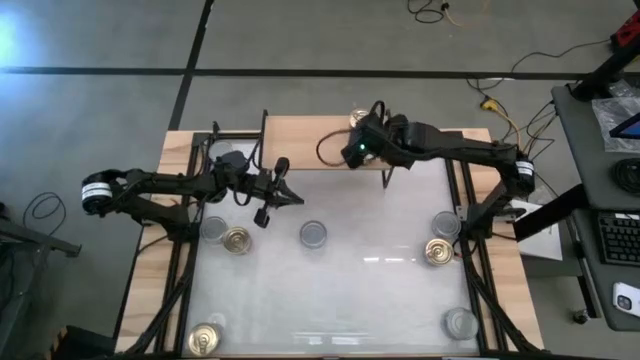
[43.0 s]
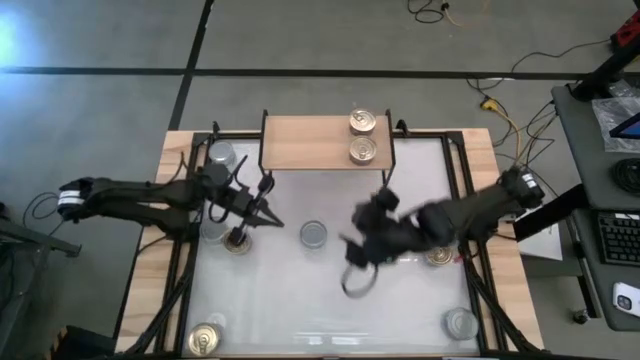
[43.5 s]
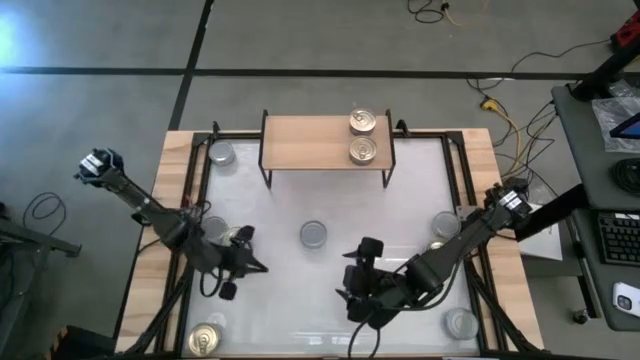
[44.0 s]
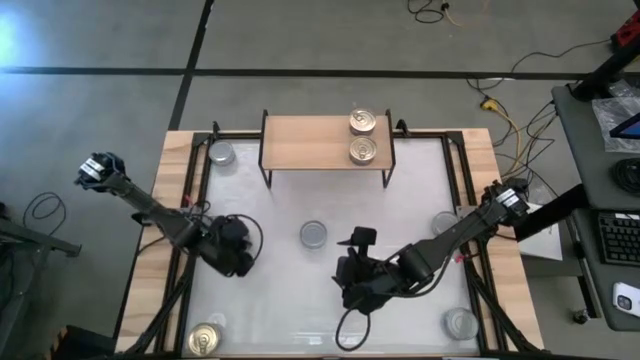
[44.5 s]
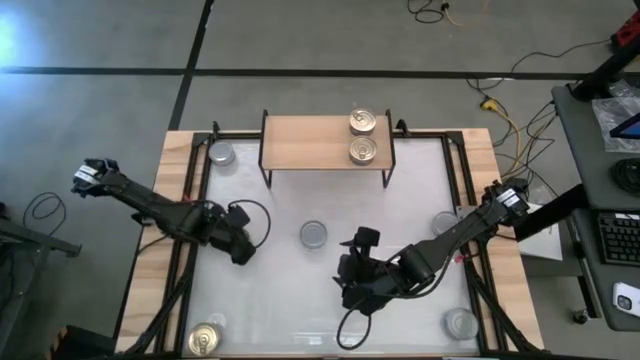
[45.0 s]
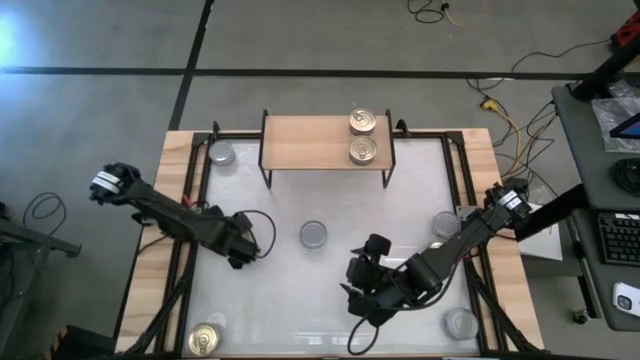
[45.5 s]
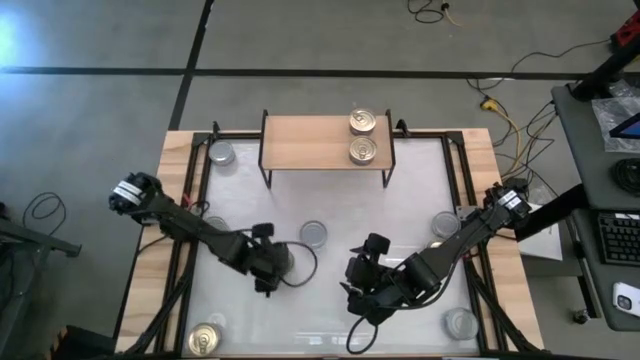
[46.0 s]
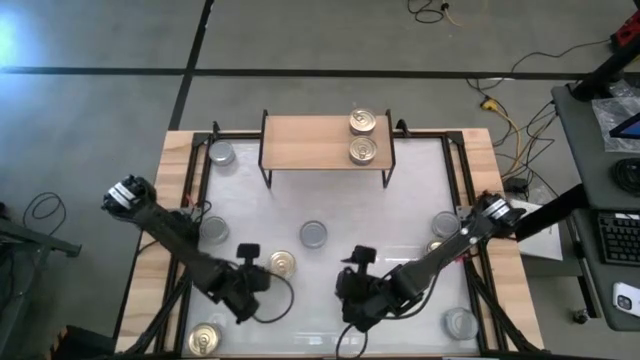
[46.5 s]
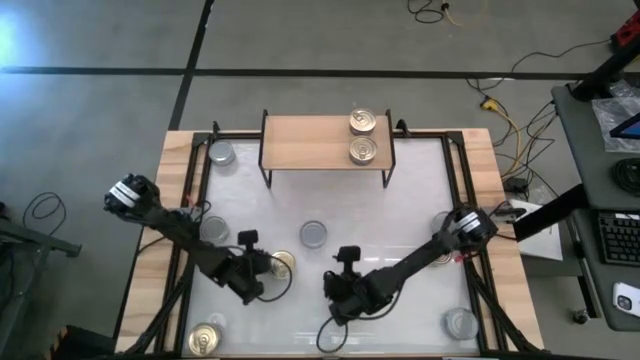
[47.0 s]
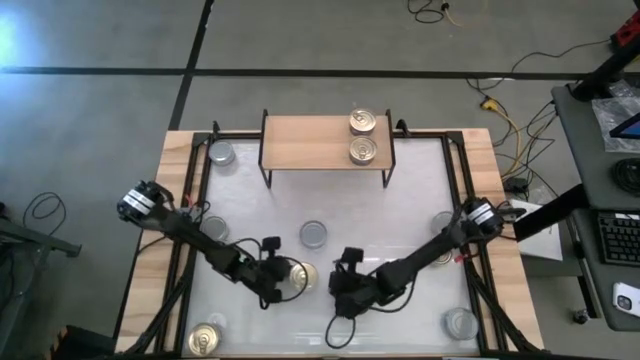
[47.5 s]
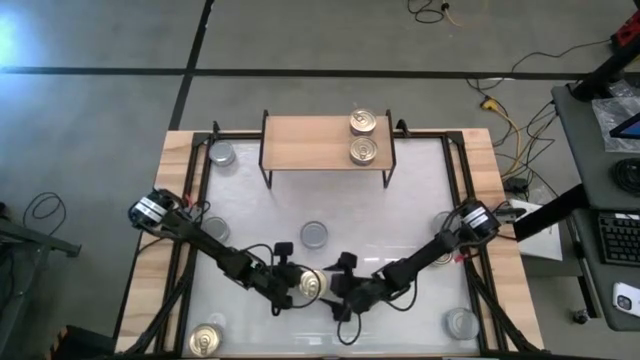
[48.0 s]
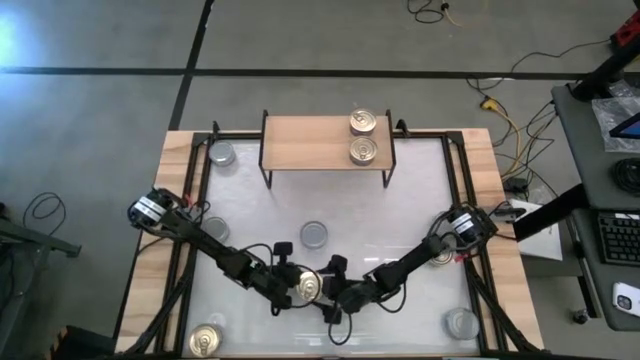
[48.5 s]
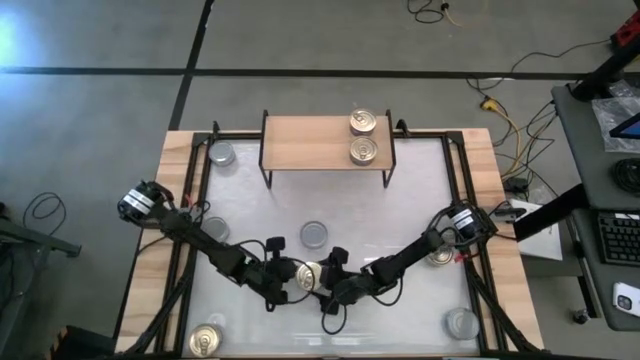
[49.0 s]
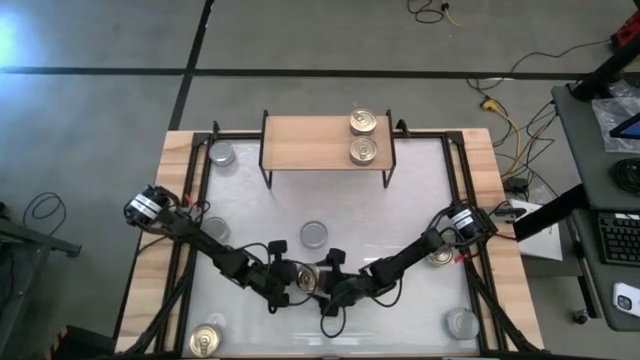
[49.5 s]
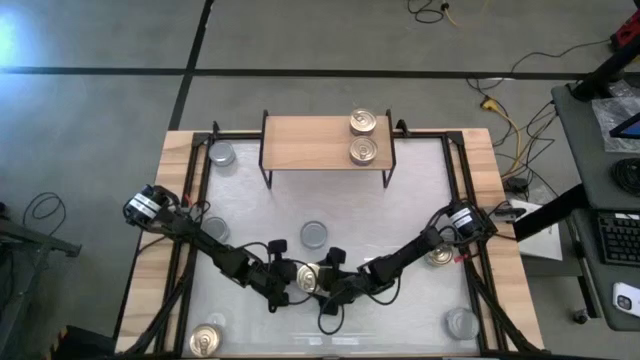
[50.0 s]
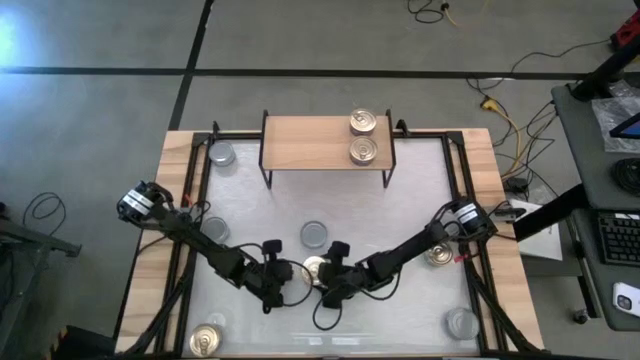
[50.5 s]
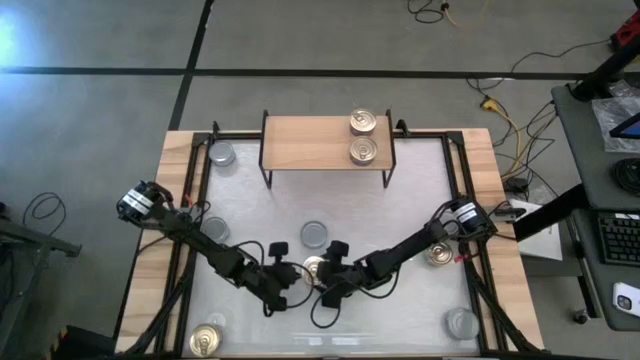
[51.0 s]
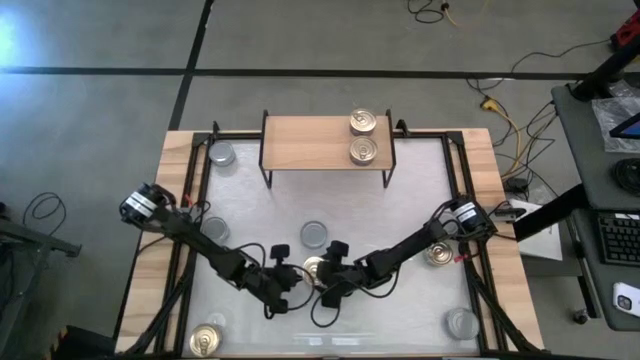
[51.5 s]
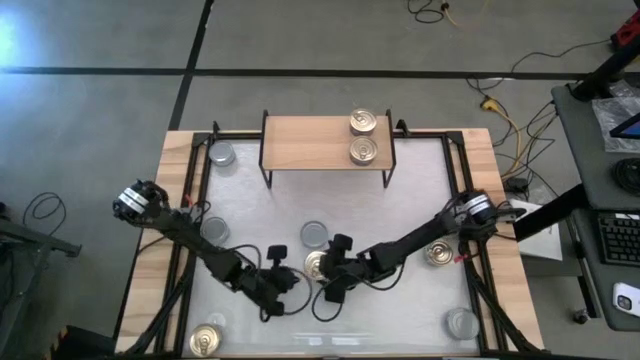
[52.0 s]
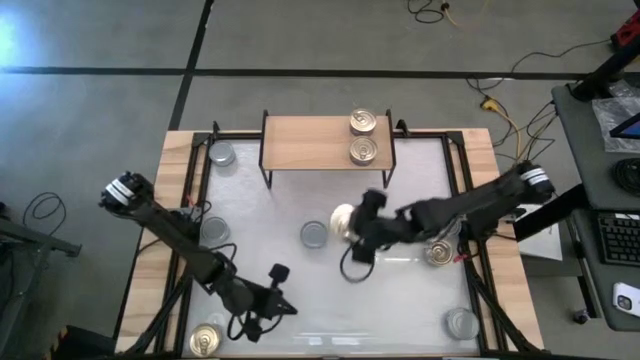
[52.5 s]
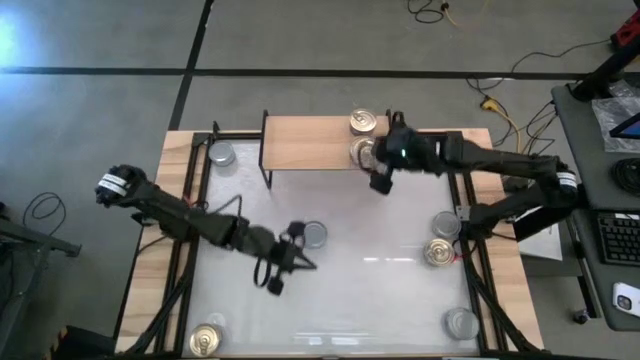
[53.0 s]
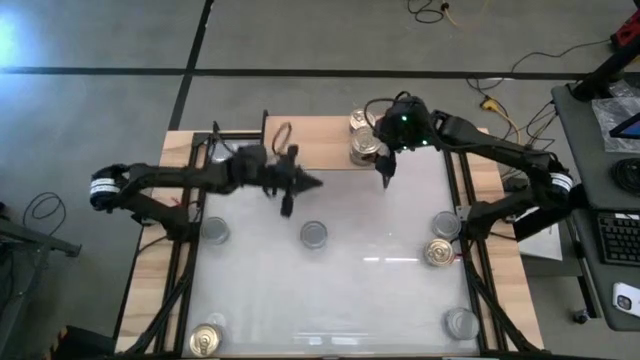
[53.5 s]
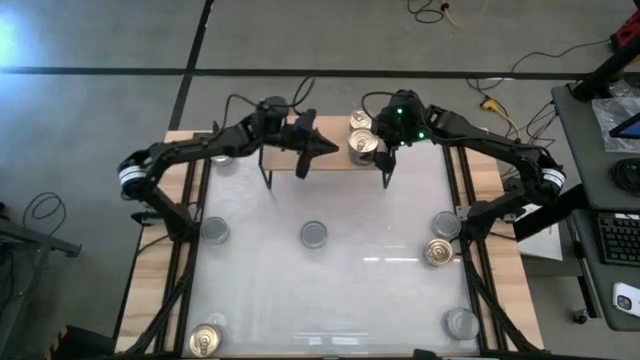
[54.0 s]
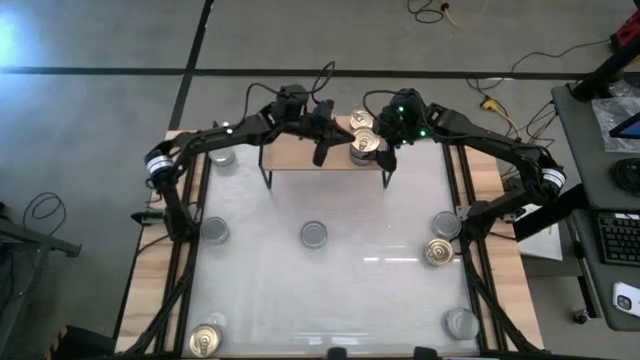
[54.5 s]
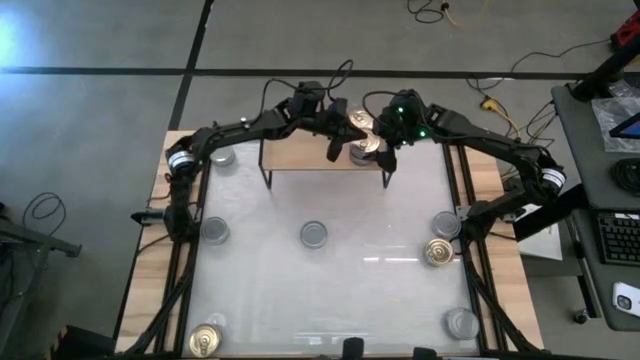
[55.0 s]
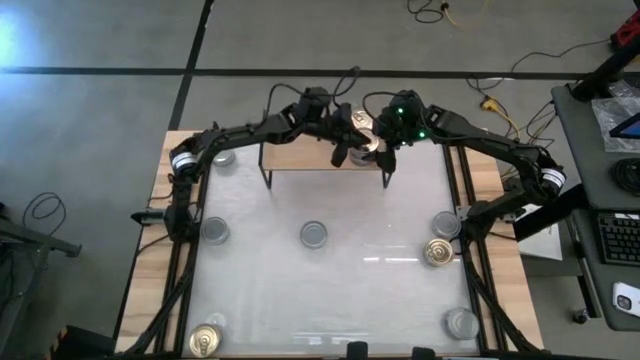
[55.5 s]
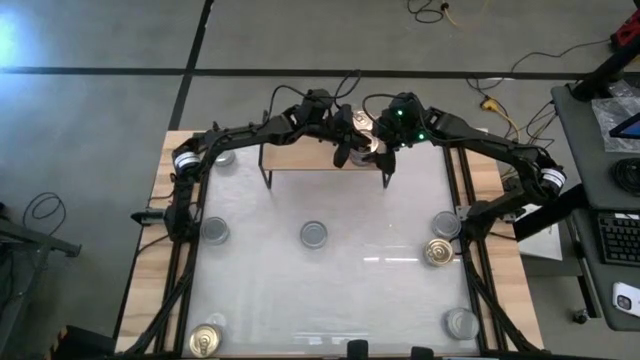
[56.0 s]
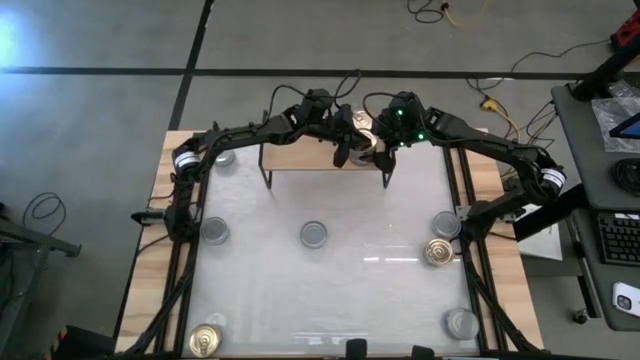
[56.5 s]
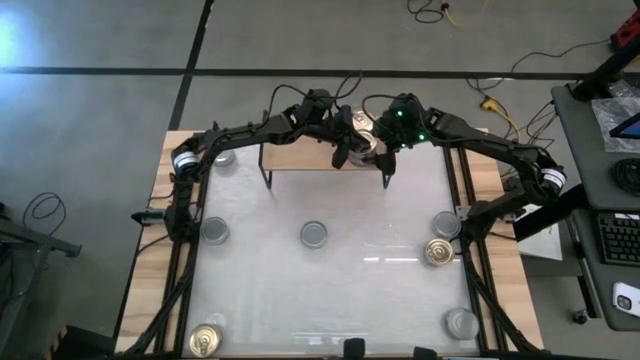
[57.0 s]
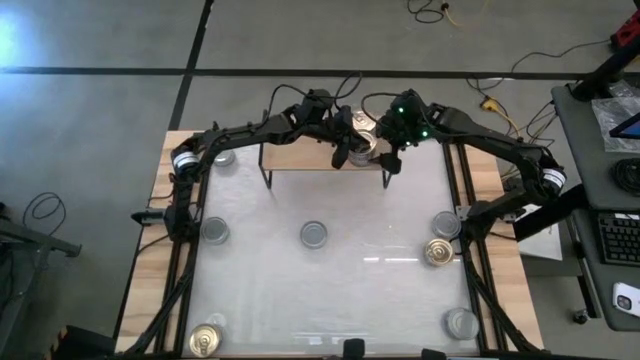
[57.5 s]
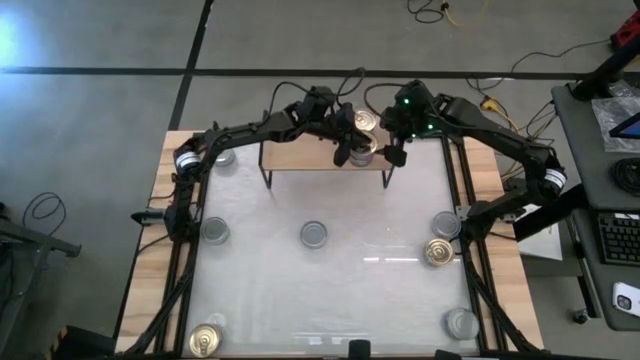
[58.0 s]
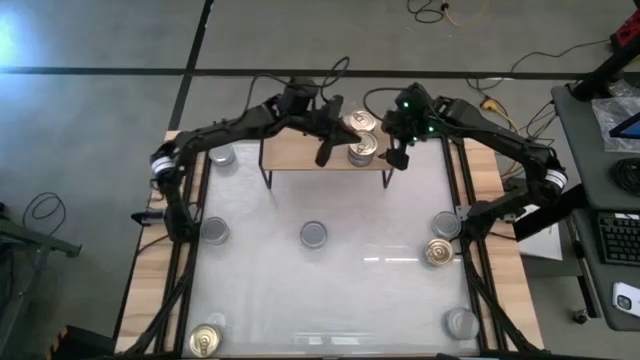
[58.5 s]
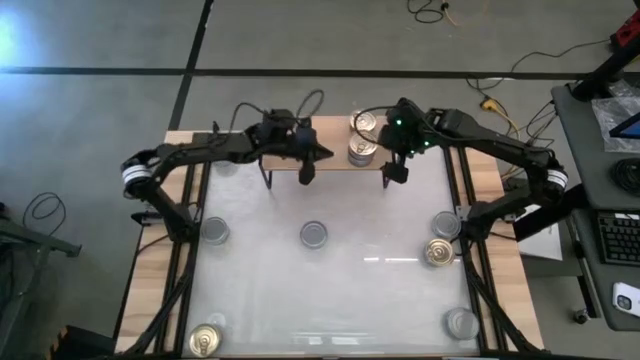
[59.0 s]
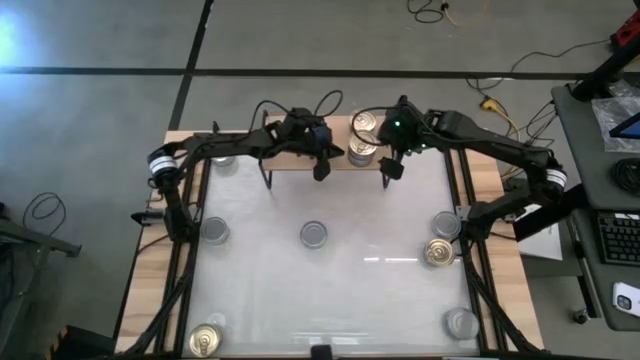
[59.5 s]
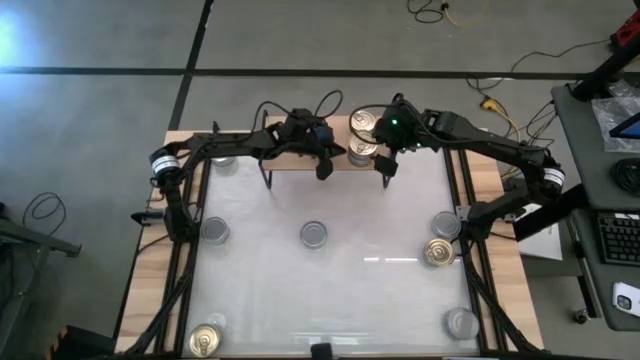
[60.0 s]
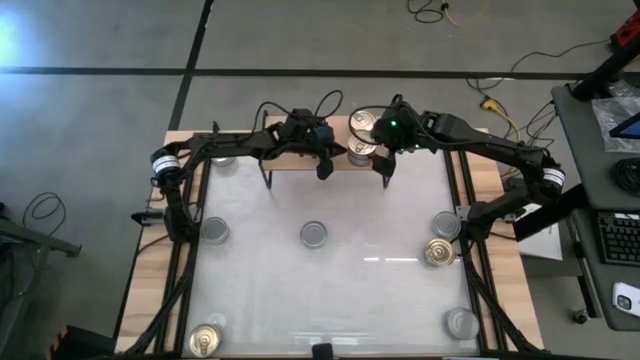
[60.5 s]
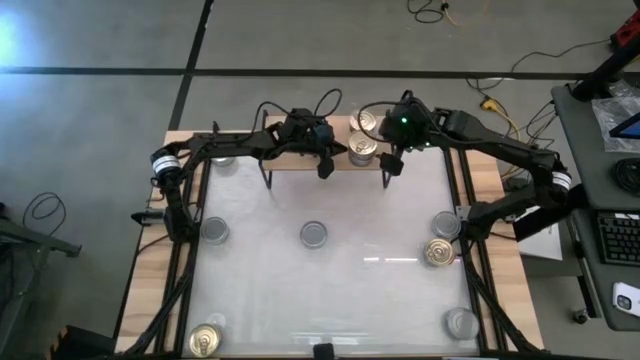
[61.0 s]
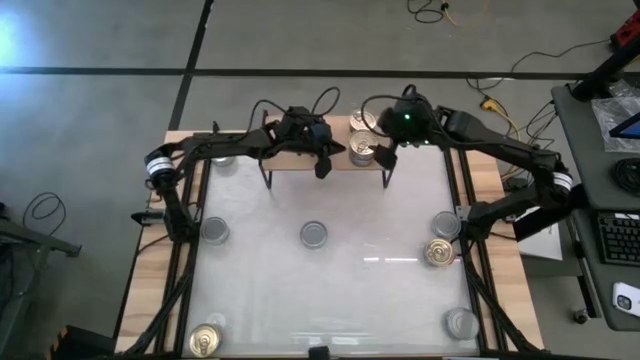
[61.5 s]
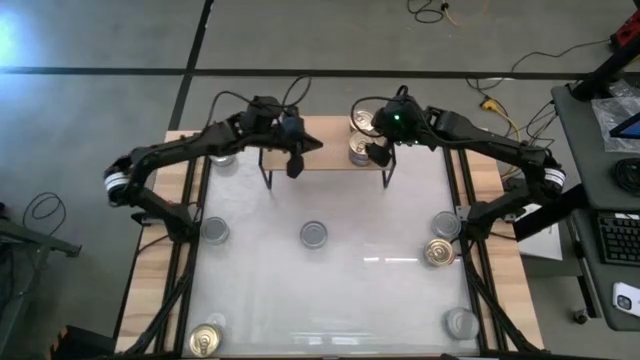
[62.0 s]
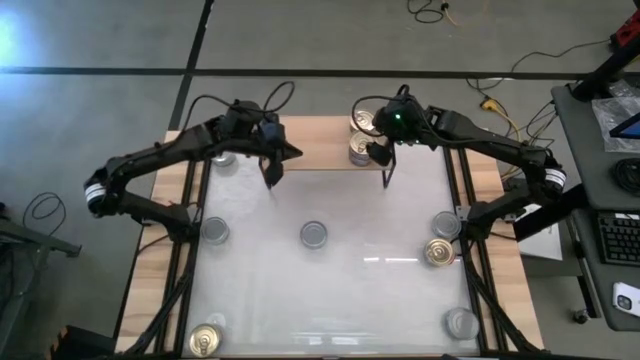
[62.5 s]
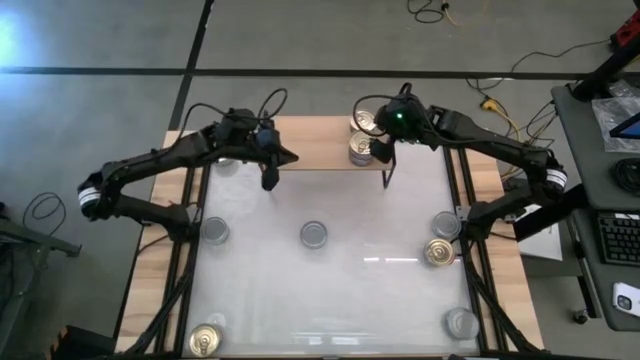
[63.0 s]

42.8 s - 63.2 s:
Task: Stack canned seafood by type on shelf
Stack the blue tuna can on top of the blue tuna can on the shelf
